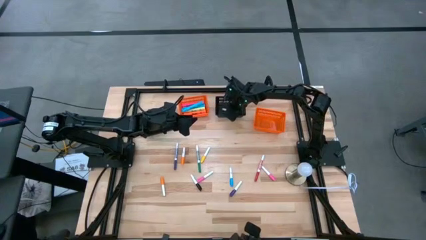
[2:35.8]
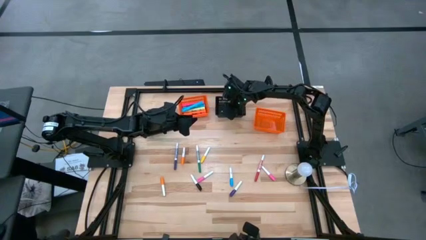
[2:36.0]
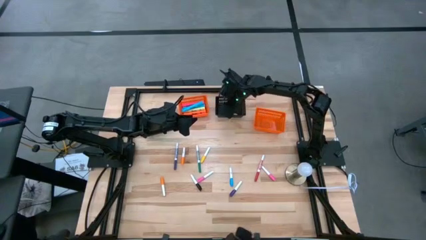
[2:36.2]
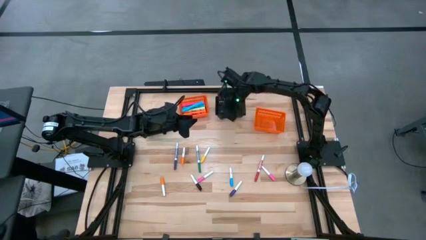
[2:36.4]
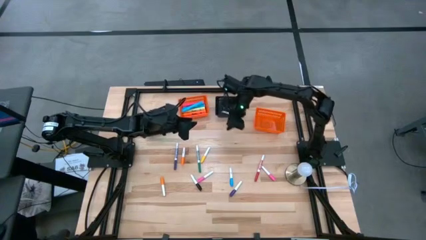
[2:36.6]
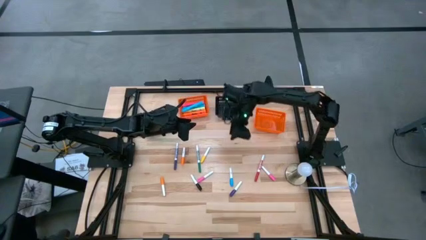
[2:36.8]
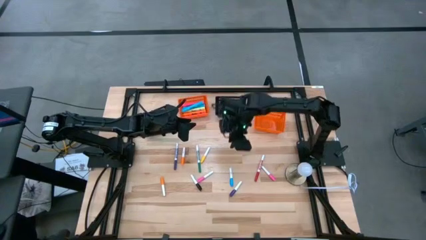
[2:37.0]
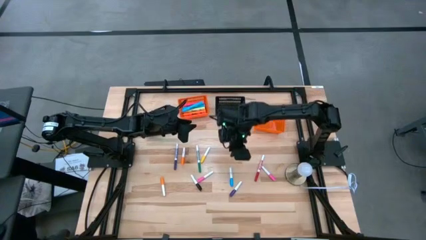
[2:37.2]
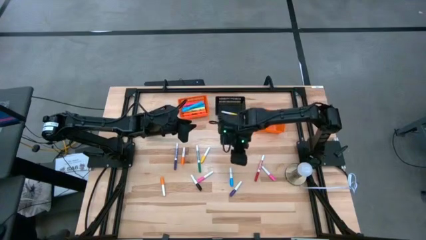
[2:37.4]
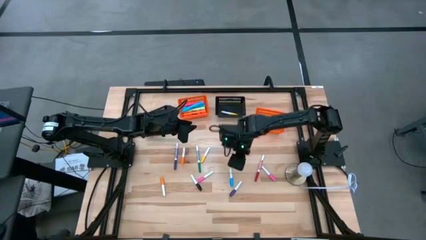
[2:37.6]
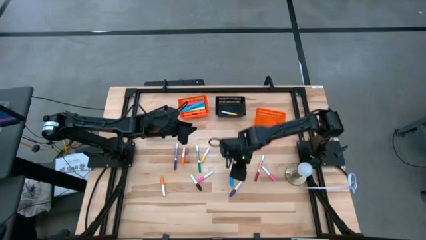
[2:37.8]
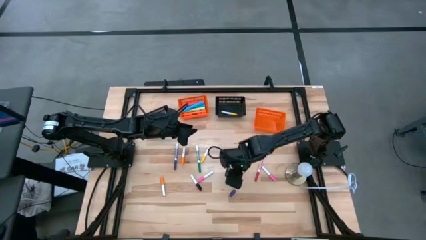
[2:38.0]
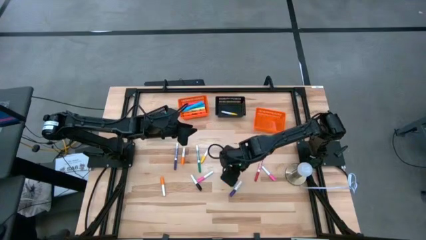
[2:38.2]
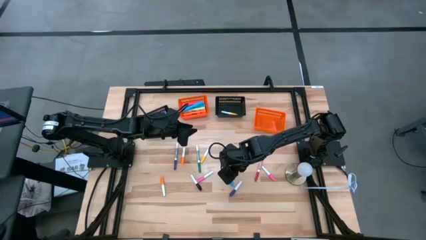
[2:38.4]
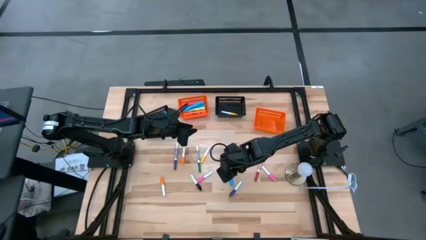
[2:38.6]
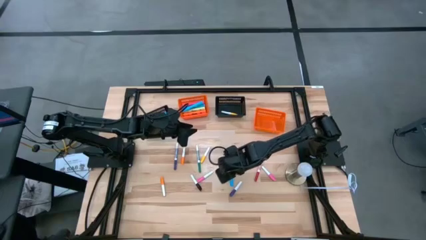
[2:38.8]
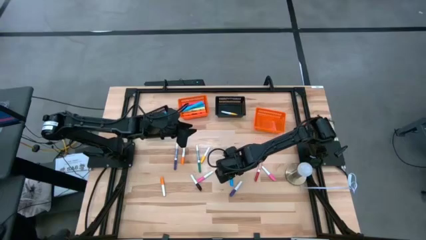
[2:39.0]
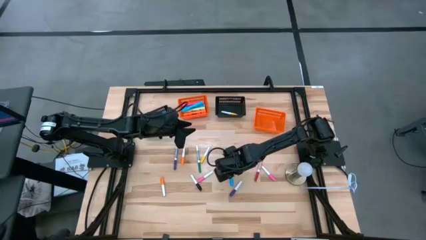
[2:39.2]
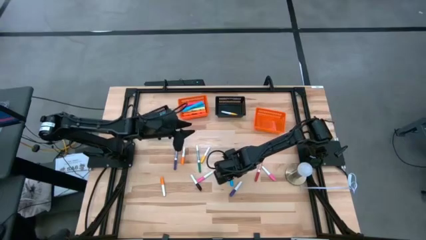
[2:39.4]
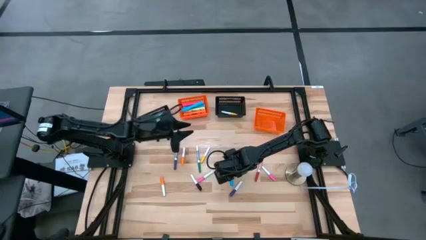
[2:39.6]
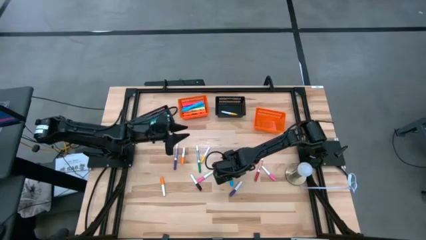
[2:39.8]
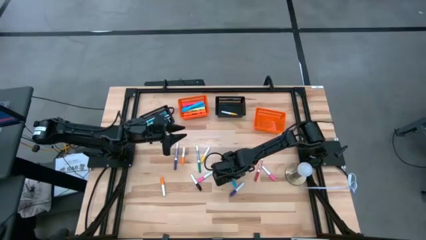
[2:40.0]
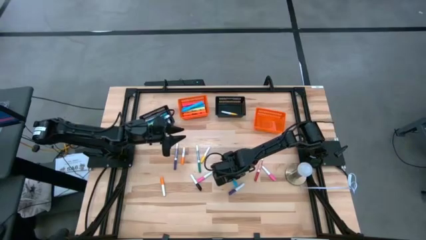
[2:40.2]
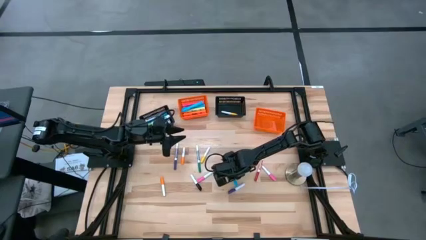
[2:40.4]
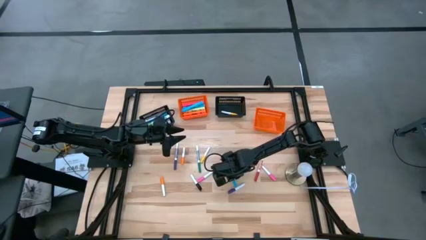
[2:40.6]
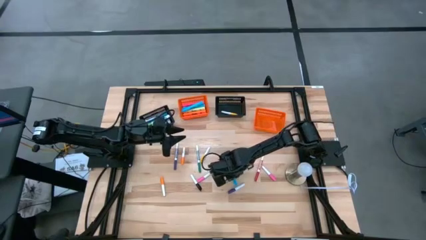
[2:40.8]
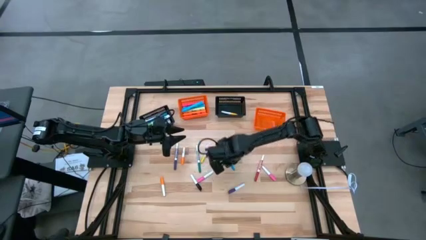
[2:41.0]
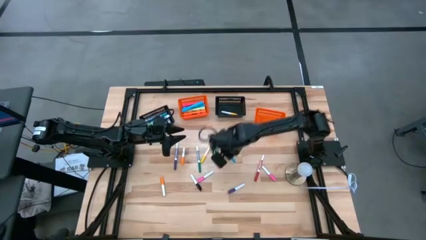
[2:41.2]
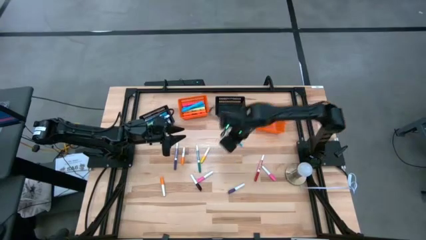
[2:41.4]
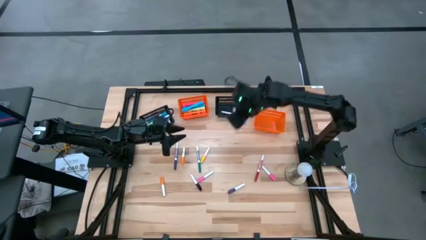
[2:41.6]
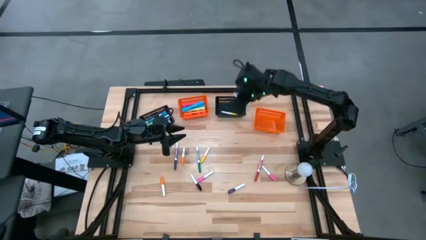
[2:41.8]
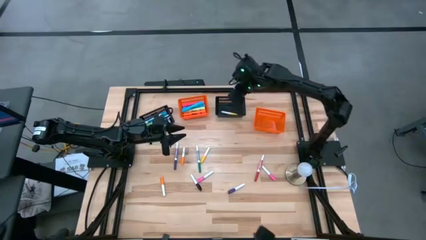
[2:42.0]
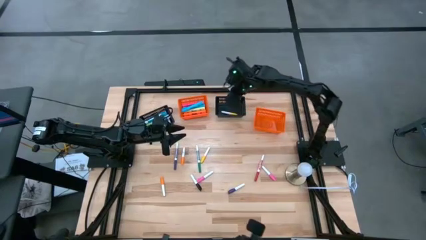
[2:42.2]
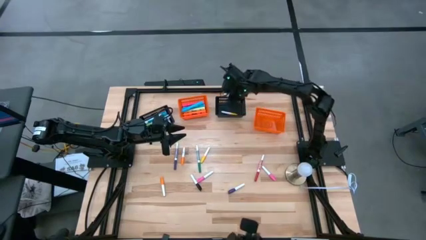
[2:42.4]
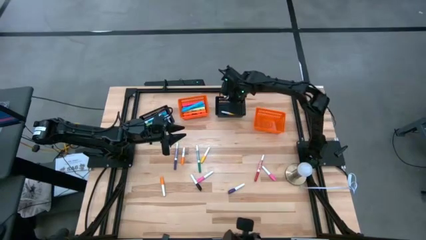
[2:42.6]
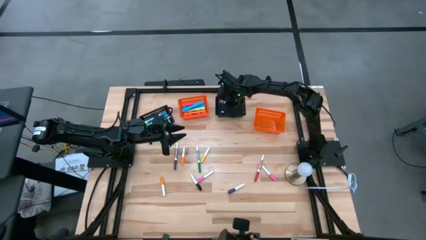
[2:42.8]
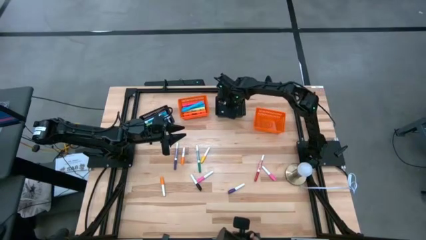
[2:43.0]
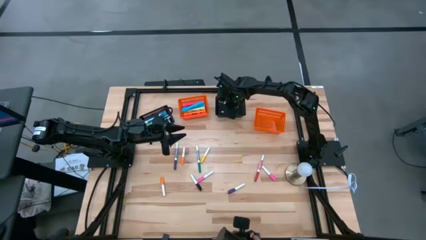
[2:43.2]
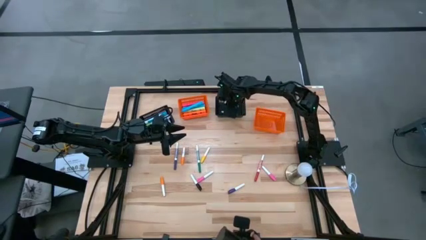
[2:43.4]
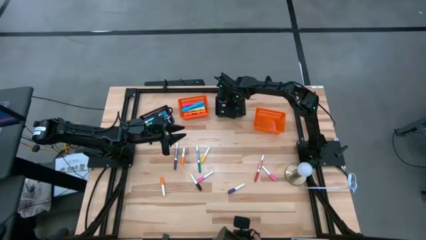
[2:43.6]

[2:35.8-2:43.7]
Task: Pick & Place Markers
Put the small light blue highlighter pen into the right black bin

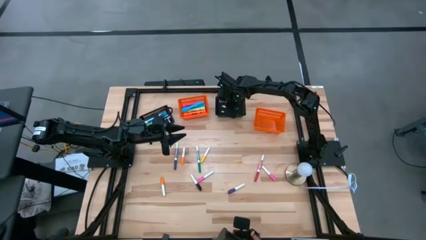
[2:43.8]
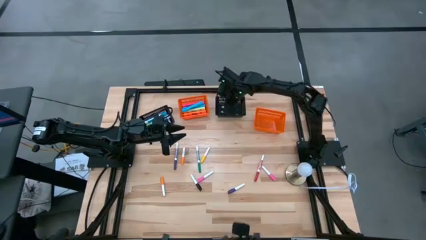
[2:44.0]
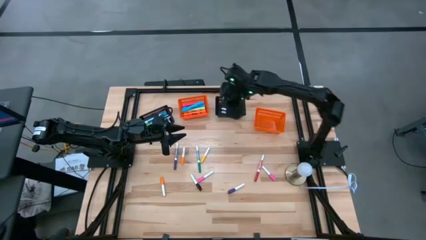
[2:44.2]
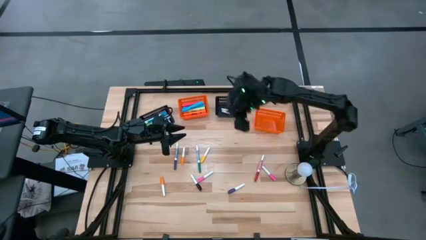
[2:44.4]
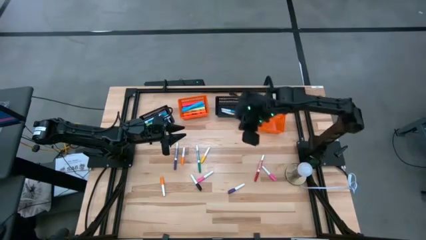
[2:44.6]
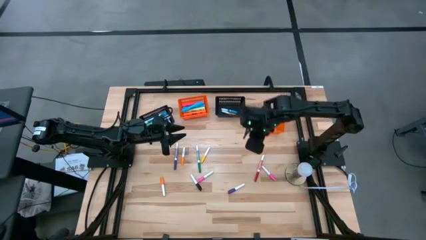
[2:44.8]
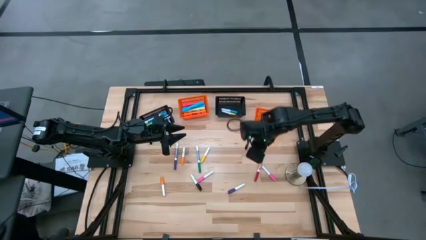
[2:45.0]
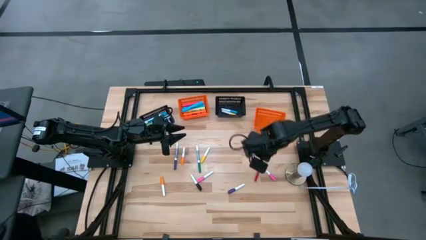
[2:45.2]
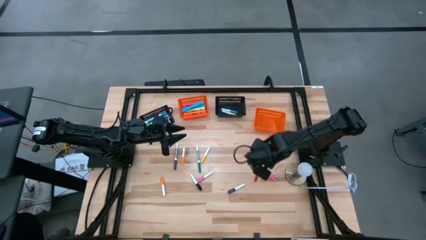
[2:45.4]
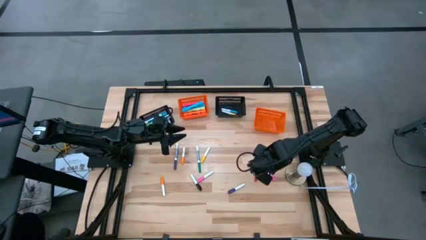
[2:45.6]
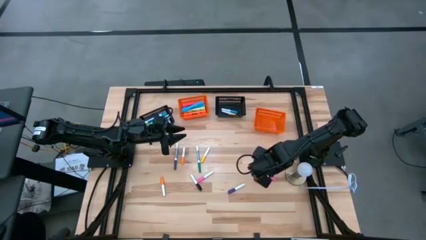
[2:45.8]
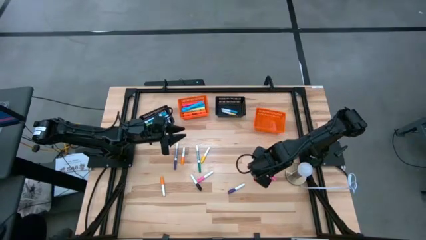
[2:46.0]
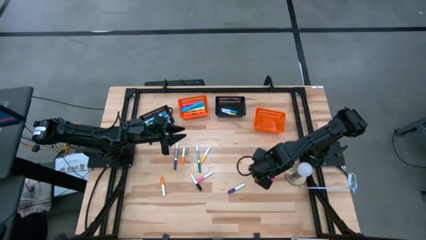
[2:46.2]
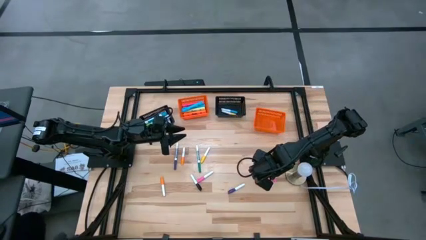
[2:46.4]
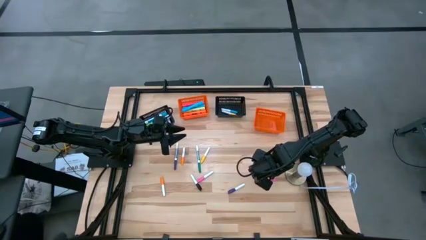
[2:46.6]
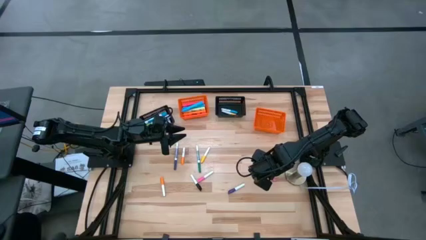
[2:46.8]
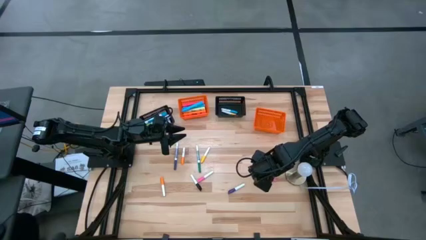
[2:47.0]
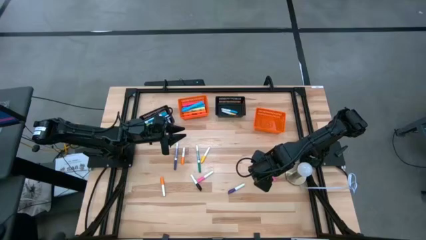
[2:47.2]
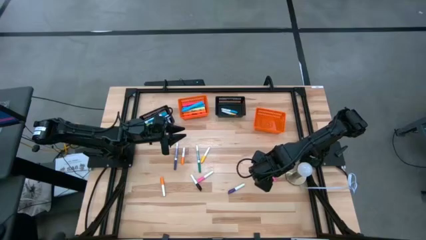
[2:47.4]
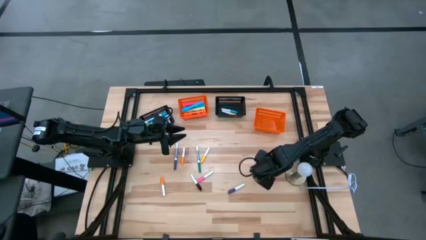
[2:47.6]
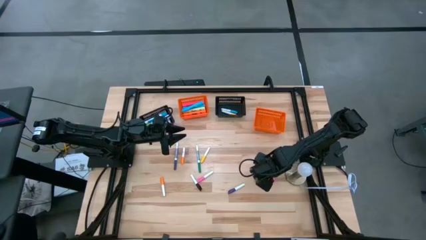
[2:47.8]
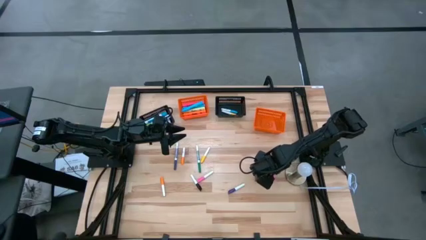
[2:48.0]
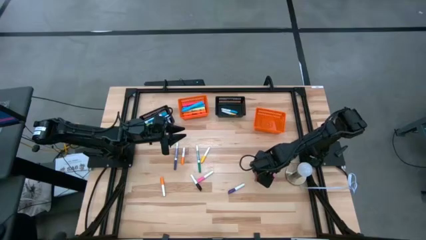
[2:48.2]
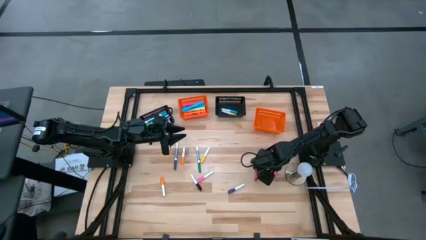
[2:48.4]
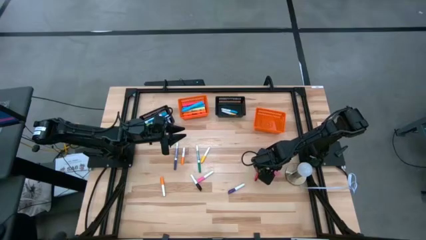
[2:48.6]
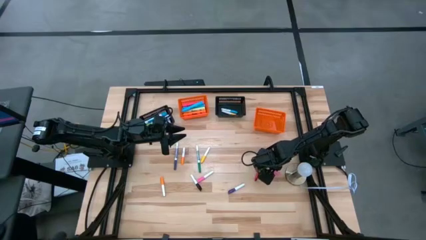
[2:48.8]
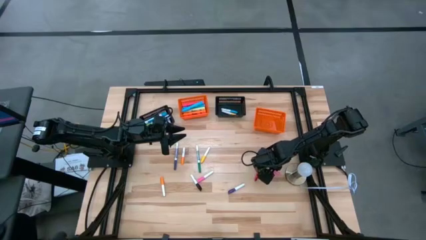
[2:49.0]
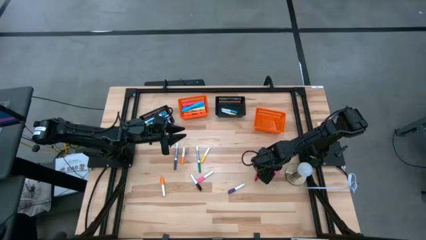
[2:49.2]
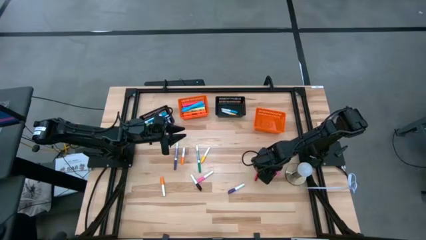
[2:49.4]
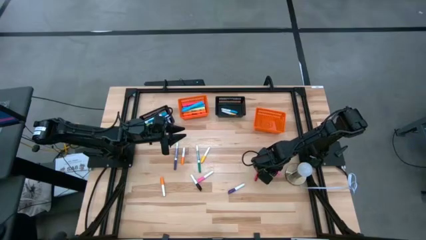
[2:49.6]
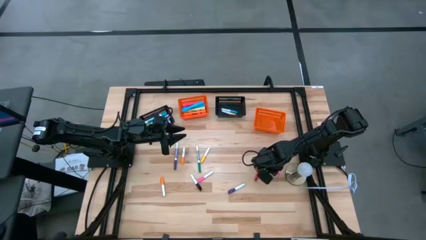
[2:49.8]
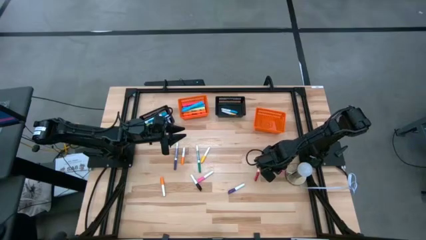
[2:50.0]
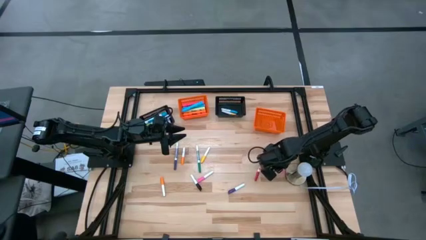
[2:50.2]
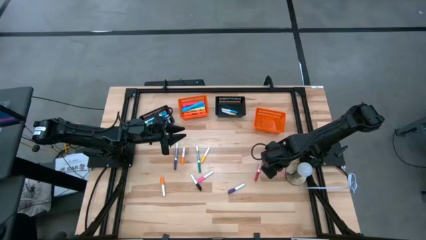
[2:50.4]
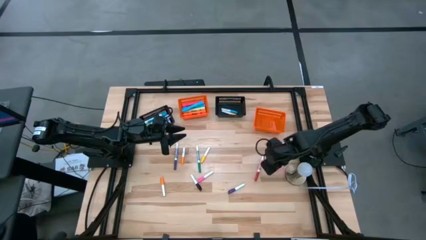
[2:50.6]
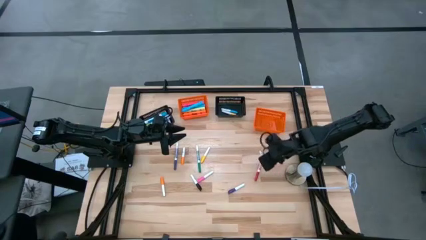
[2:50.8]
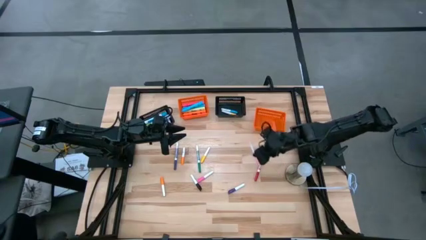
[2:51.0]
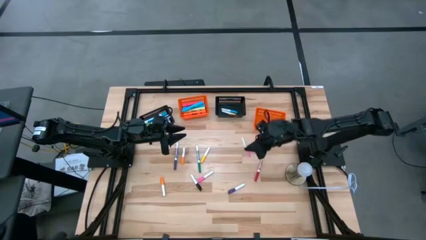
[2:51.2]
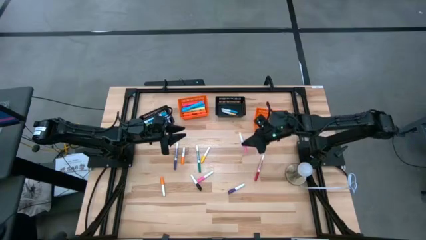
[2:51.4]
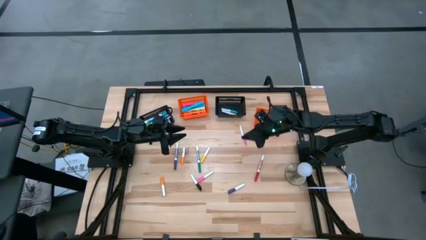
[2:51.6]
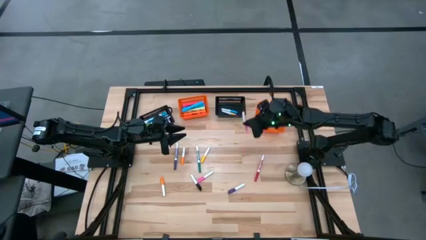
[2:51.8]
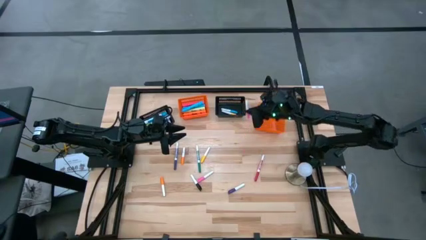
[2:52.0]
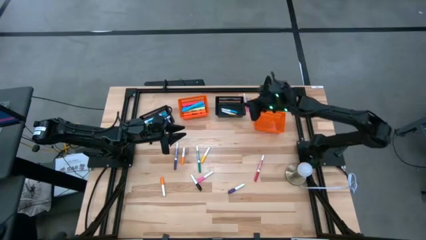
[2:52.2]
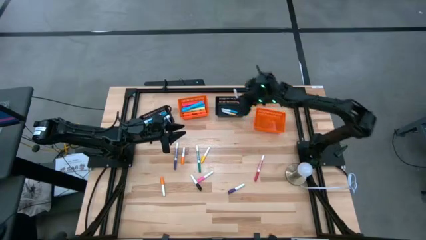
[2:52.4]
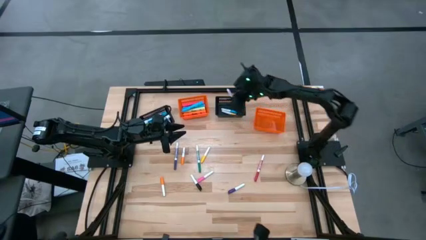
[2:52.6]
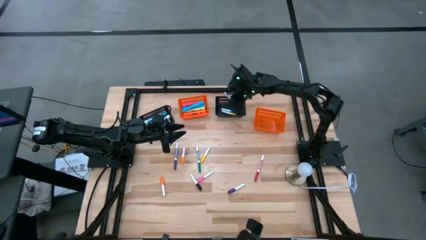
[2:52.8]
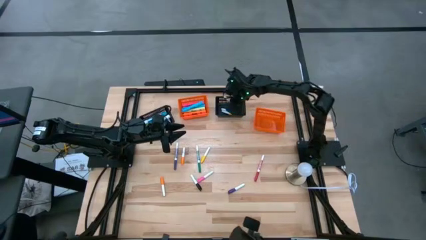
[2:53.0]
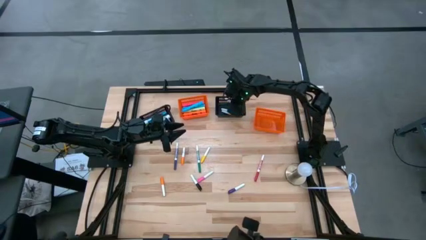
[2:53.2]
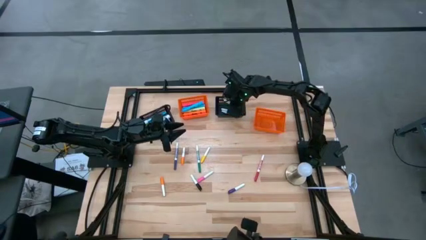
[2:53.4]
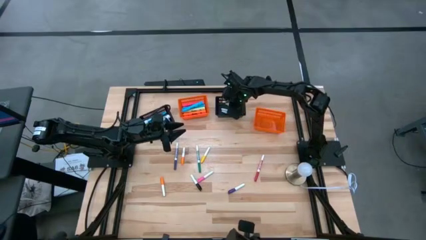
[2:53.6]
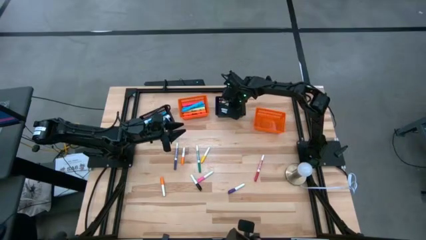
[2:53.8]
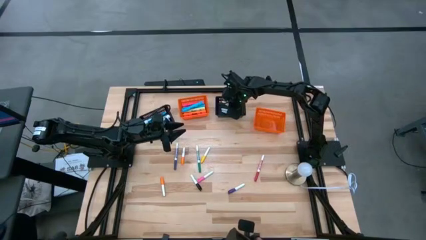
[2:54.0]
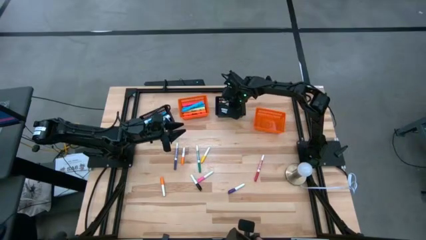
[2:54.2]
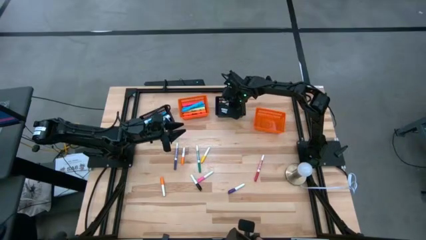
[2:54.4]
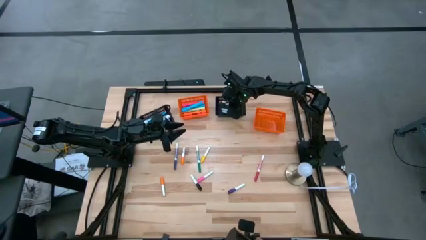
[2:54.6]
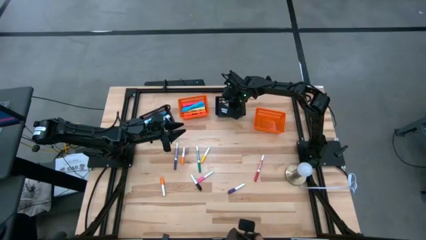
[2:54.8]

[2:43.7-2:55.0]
Put the right small pink highlighter pen into the right black bin
